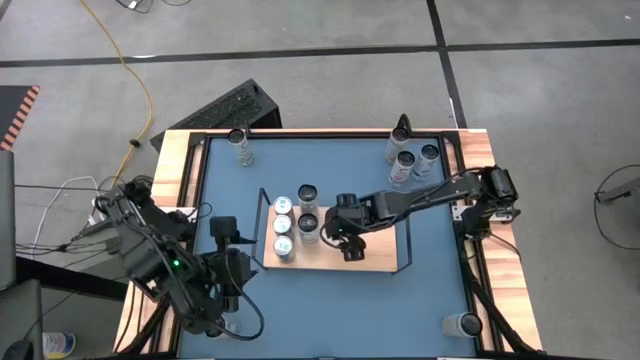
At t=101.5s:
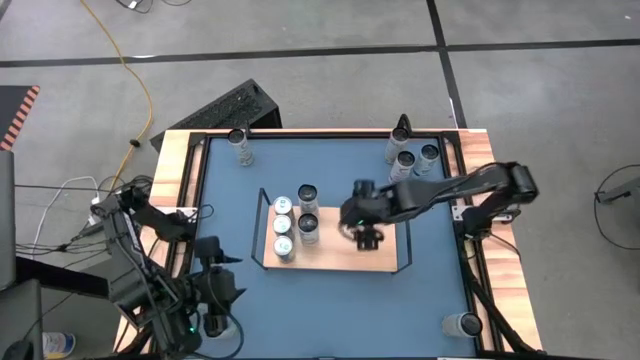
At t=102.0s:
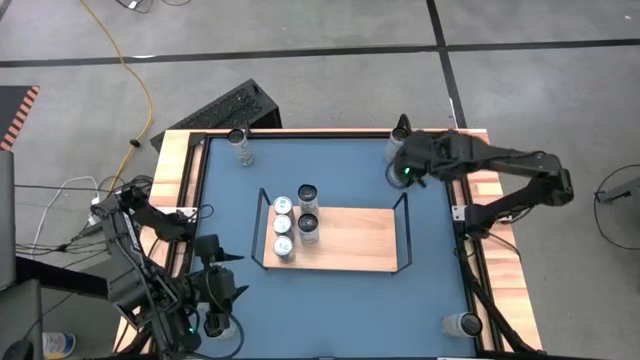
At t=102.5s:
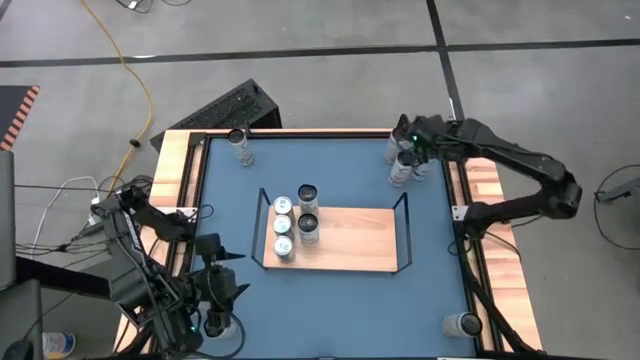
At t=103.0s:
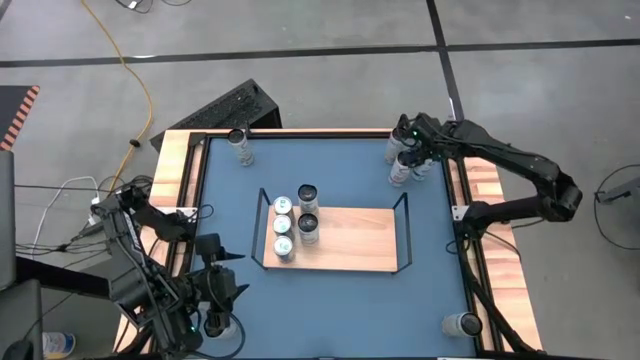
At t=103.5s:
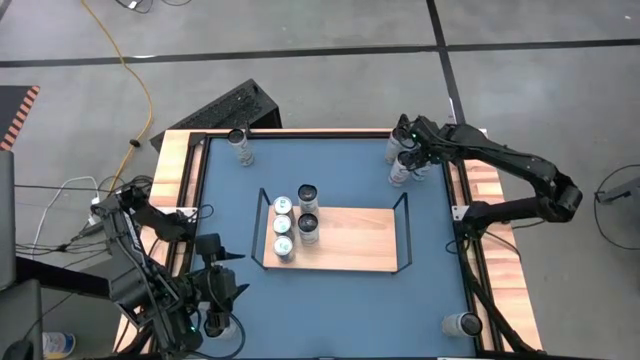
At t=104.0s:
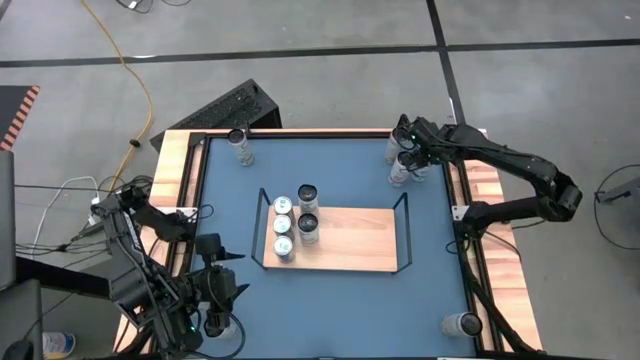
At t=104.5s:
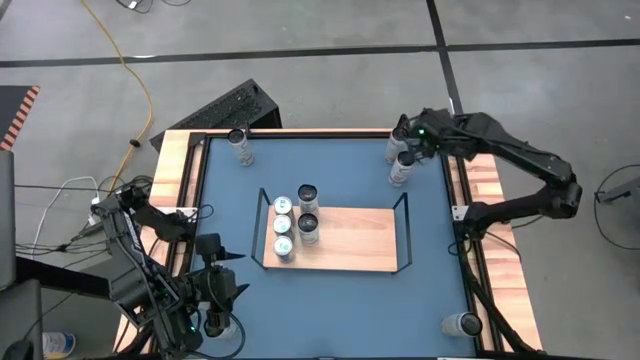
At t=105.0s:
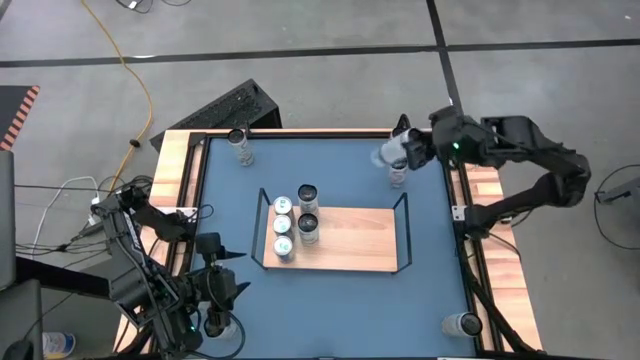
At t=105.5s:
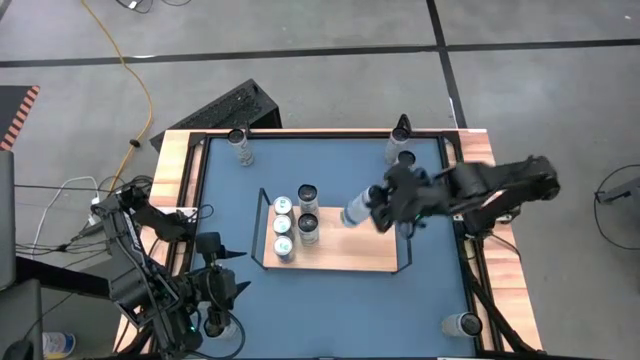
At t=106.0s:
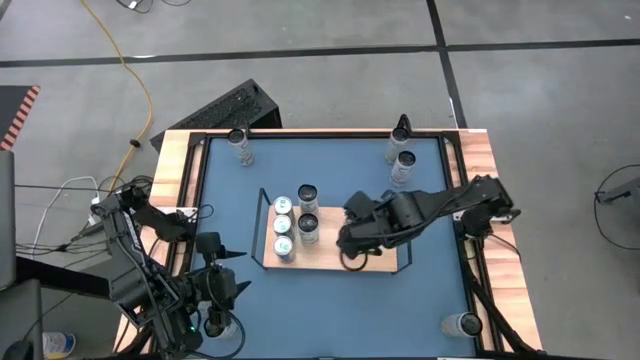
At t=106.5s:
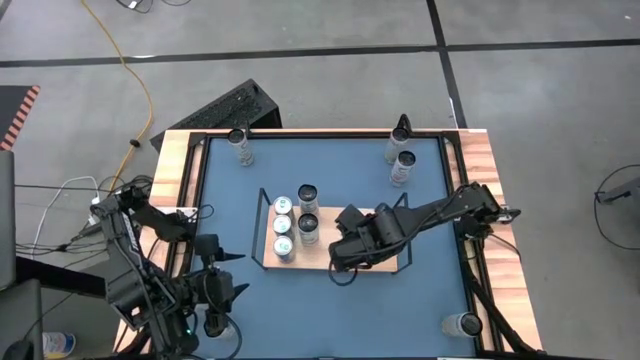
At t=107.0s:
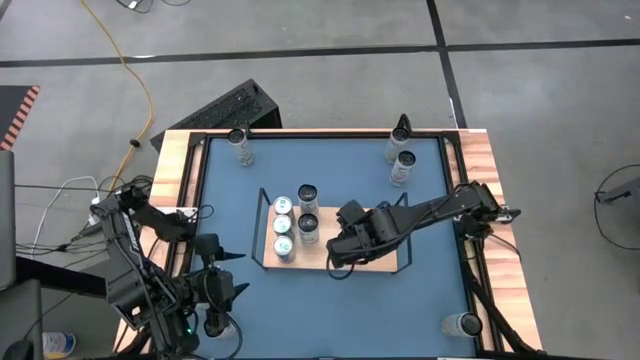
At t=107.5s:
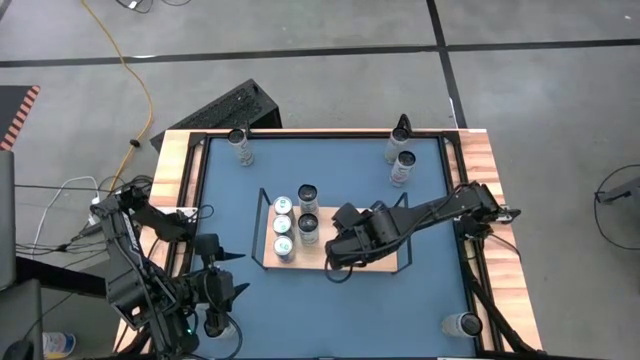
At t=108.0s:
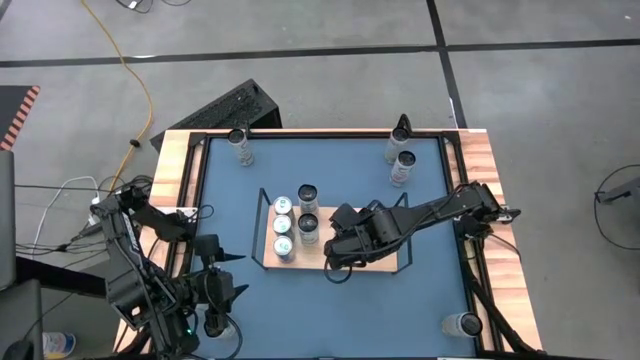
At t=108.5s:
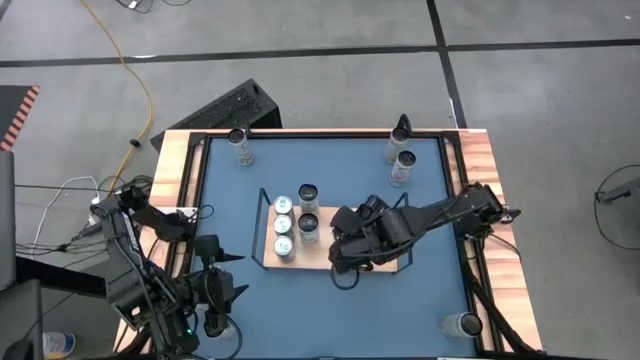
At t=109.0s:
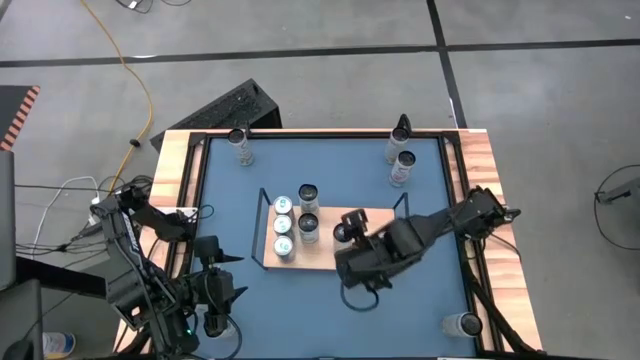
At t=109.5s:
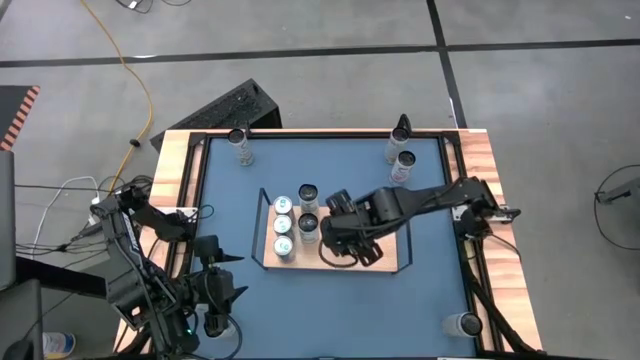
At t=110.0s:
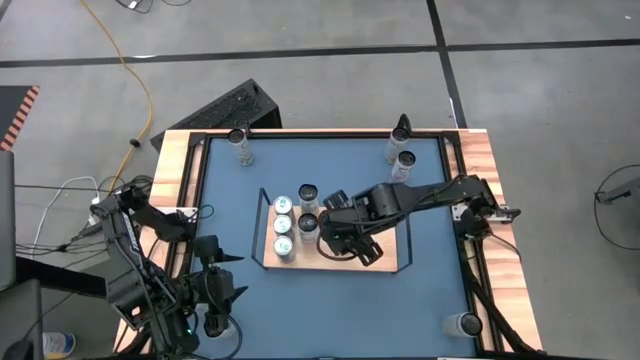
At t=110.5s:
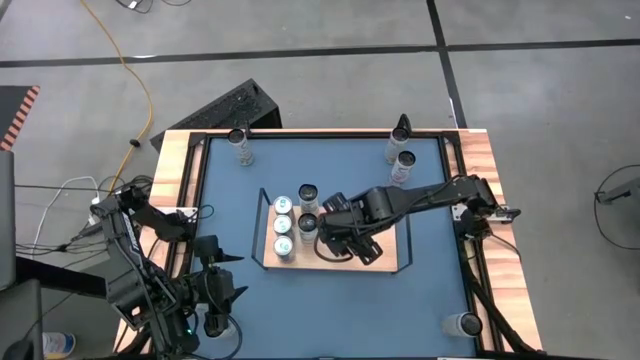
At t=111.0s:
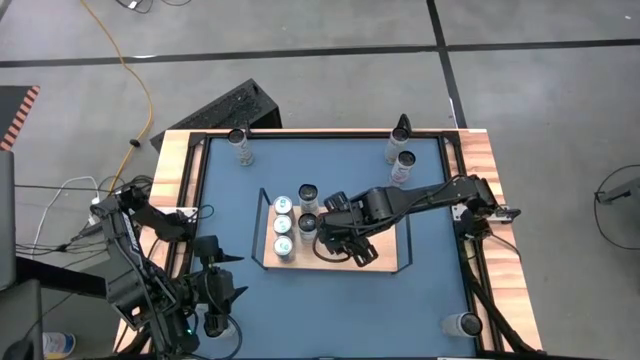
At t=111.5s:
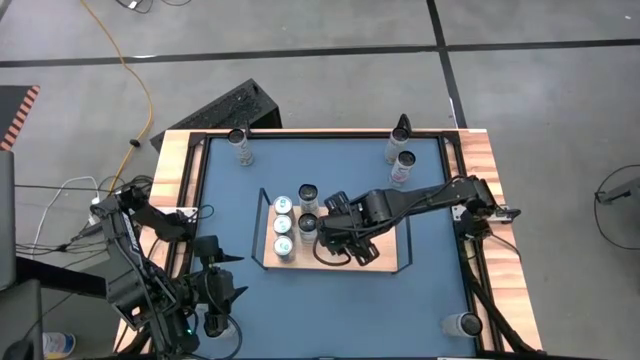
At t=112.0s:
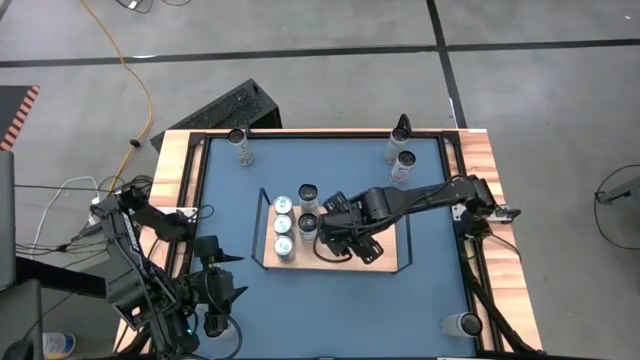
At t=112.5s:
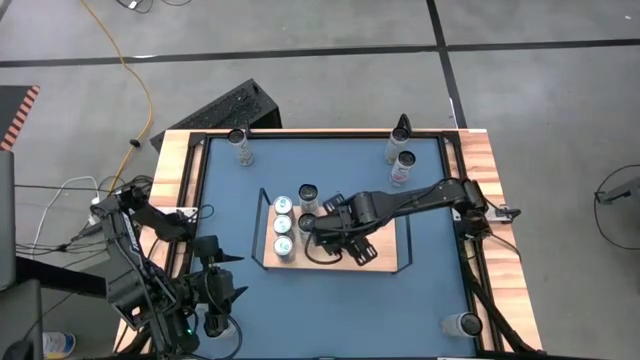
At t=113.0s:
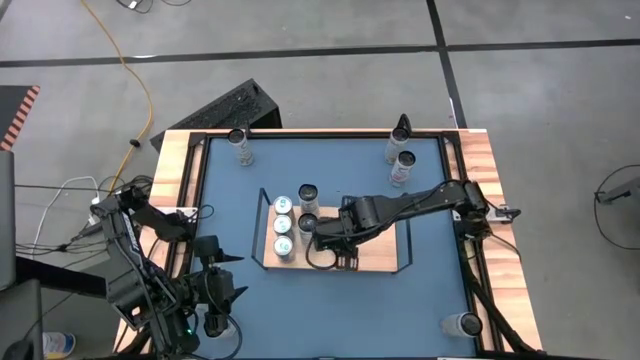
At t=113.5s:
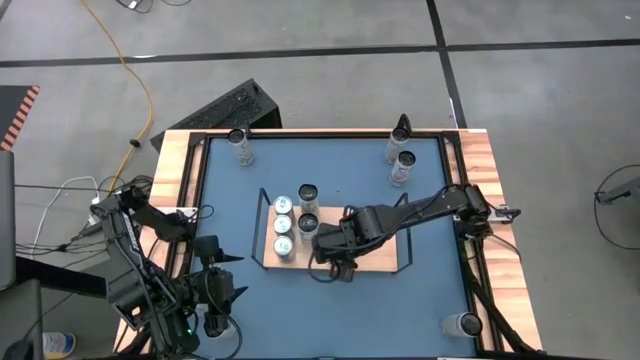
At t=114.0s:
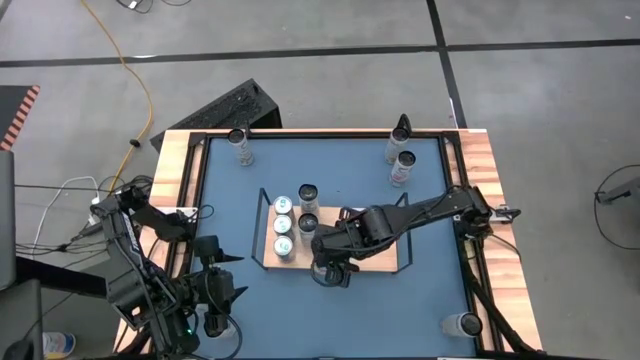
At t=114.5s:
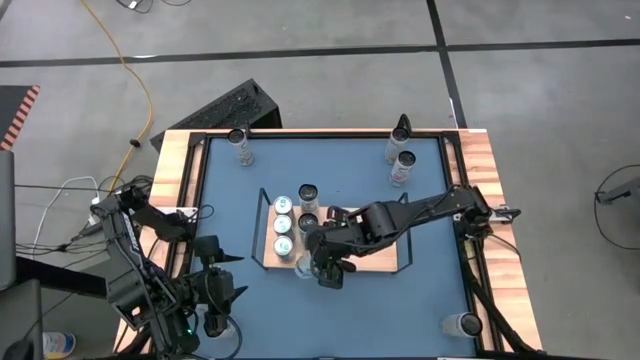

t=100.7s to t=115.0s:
Task: Place canned beverage on shelf
Put the white blue soda can on the shelf aligned with the other blue soda cans

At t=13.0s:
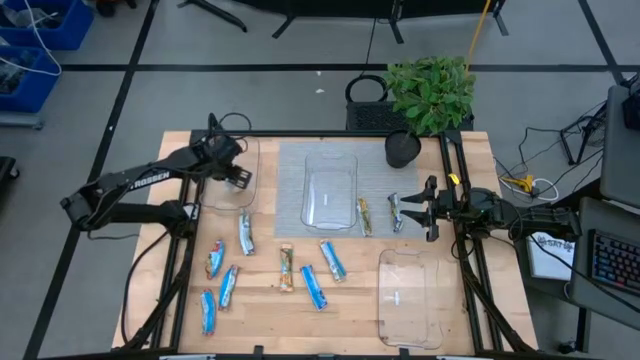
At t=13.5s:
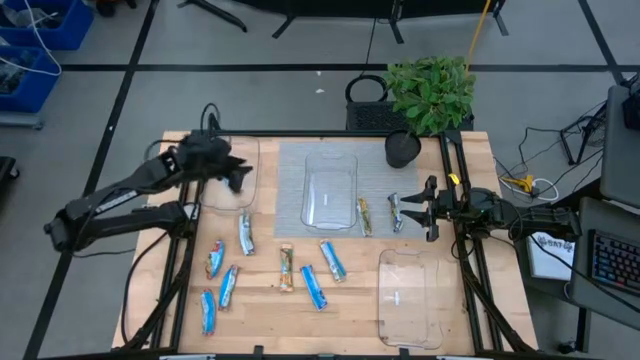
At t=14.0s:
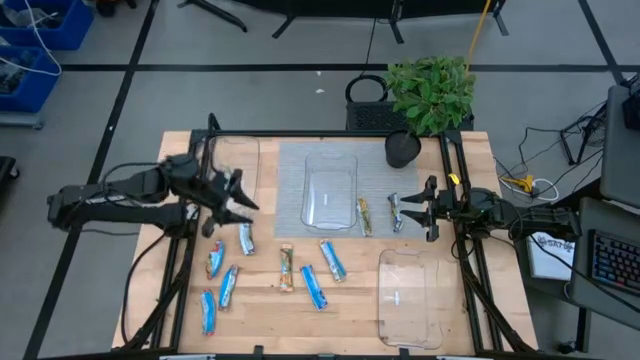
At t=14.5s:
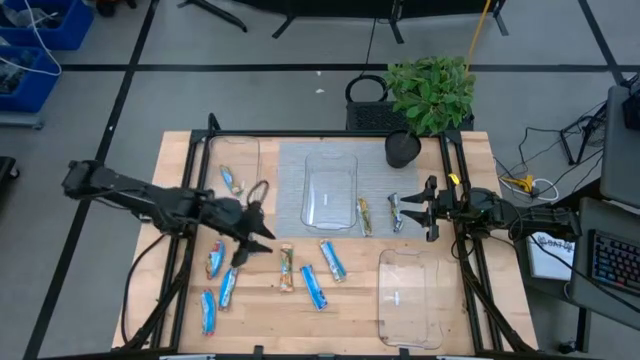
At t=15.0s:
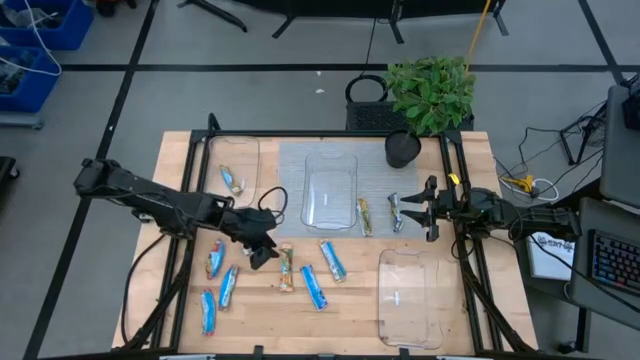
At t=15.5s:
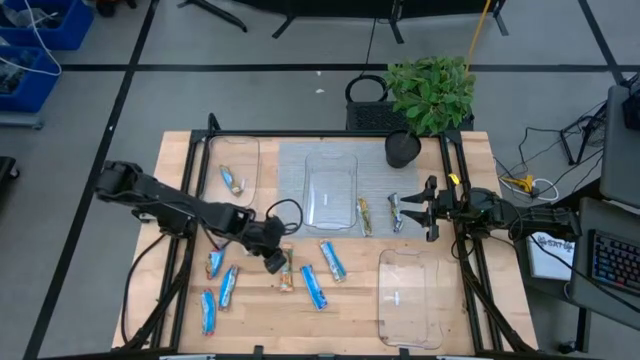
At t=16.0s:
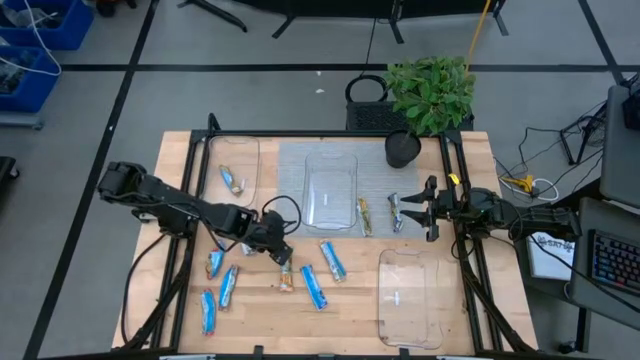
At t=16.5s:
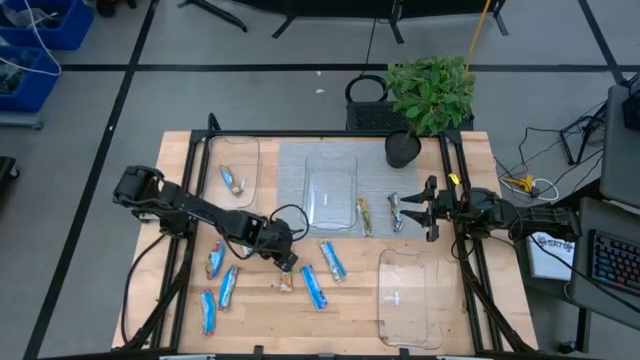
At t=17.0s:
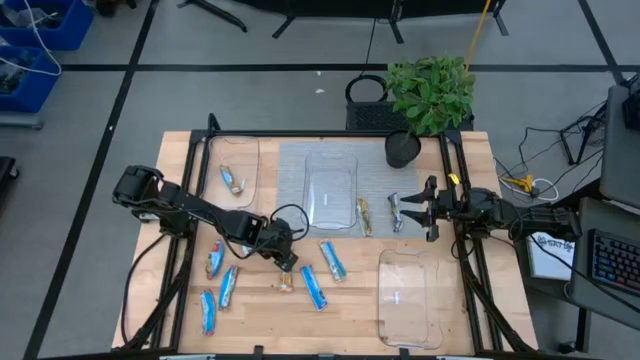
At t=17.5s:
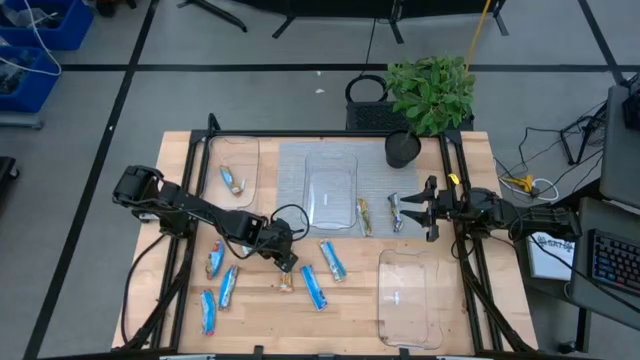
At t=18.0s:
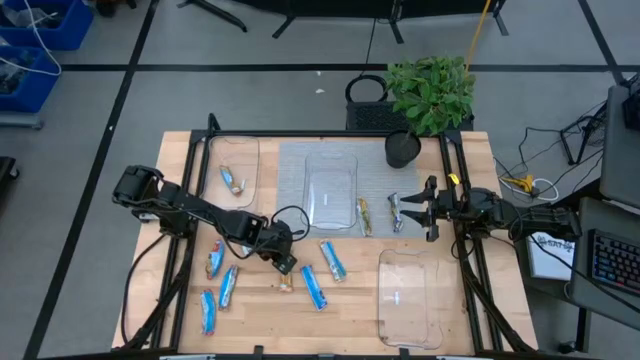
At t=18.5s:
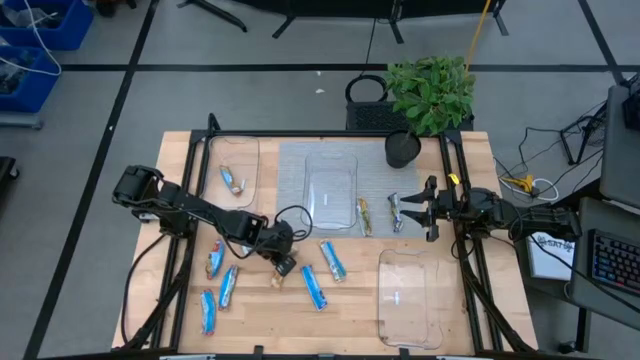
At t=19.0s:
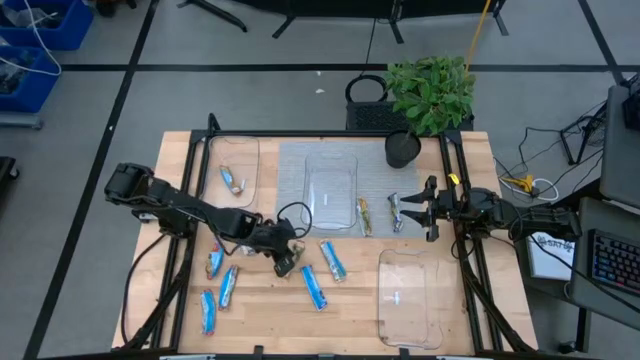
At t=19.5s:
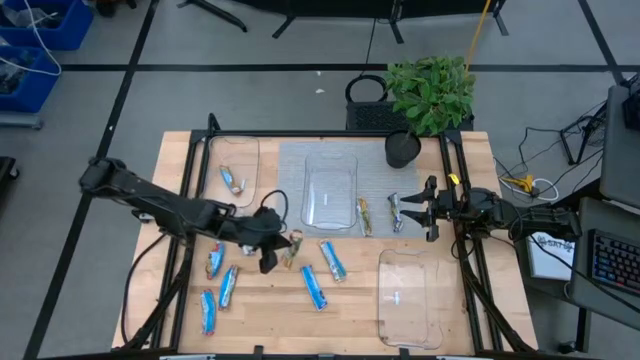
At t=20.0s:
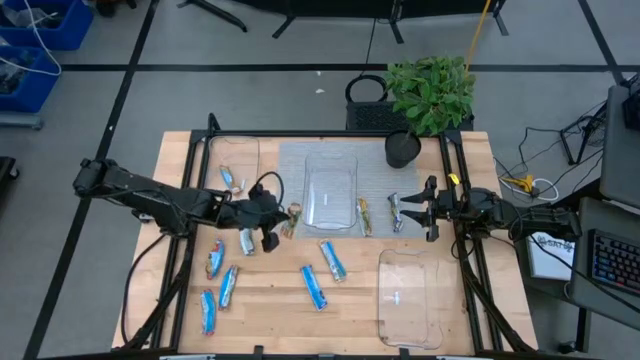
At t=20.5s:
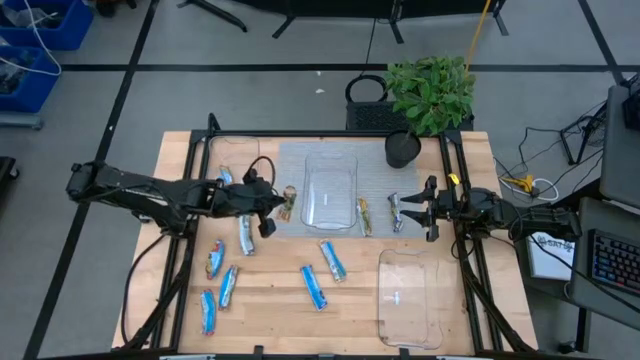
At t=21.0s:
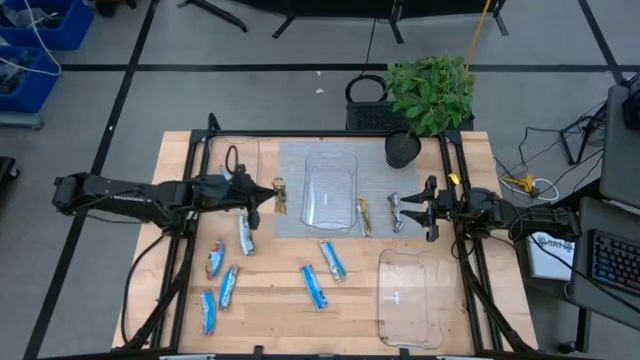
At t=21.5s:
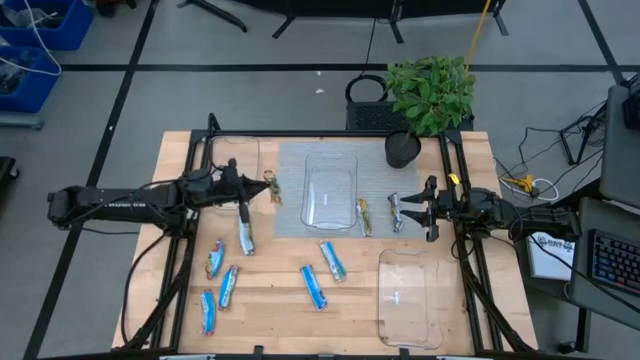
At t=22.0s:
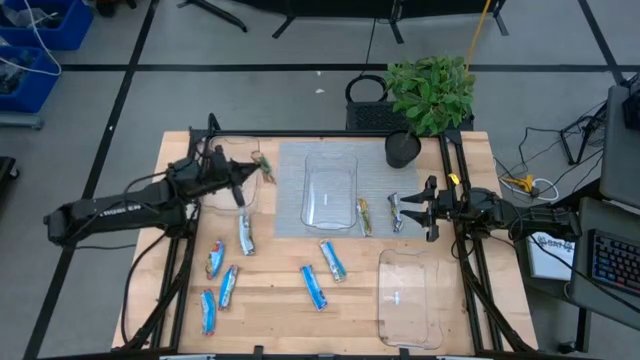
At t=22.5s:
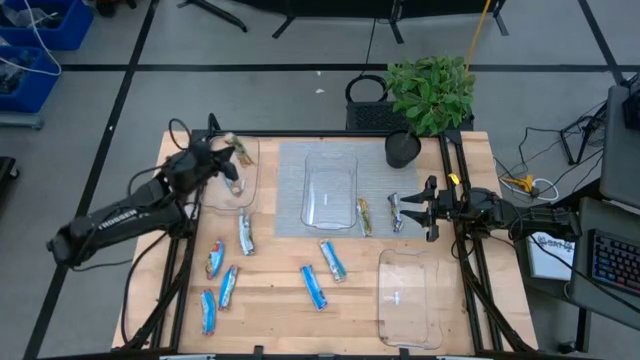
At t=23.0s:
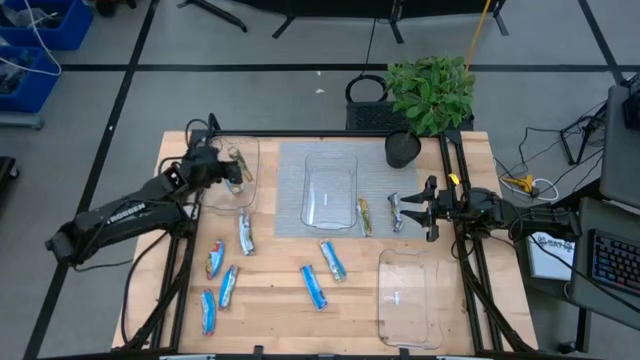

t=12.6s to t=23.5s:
Task: Pick and place Granola Bars by type
Put the yellow granola bar into the top left transparent bin
